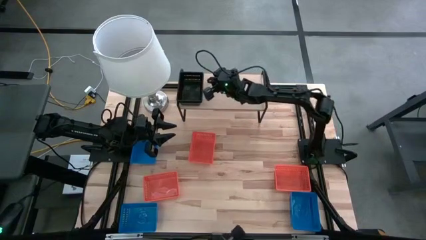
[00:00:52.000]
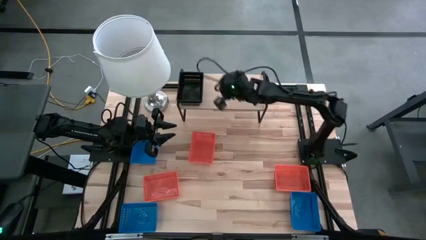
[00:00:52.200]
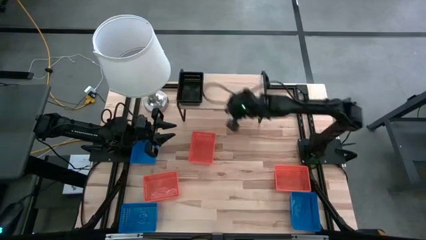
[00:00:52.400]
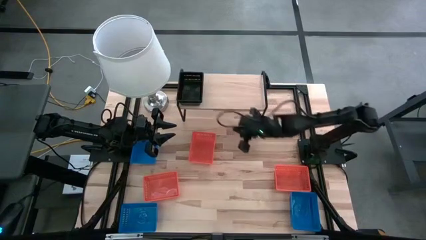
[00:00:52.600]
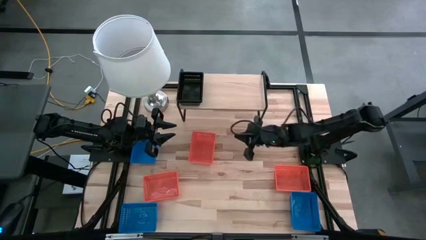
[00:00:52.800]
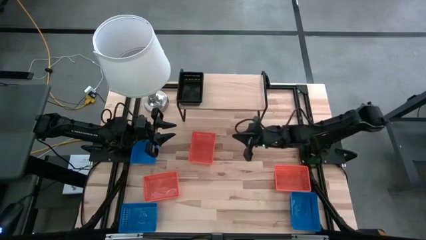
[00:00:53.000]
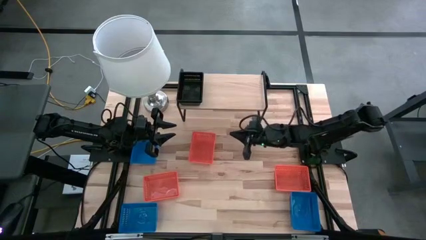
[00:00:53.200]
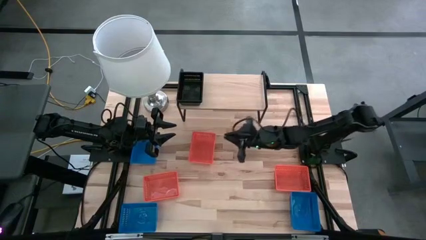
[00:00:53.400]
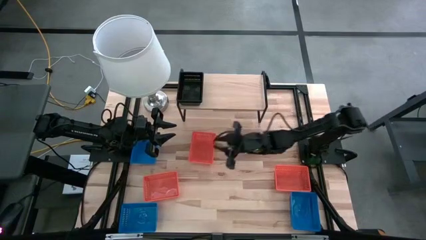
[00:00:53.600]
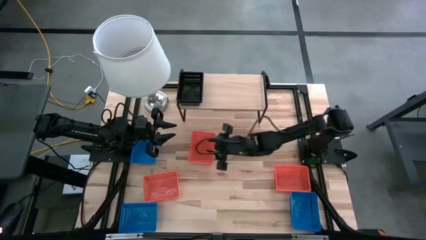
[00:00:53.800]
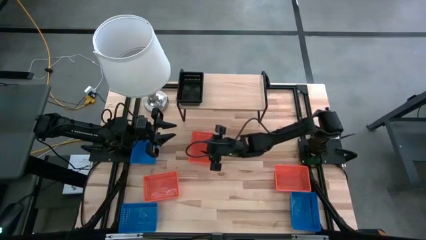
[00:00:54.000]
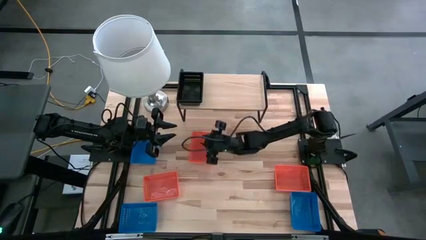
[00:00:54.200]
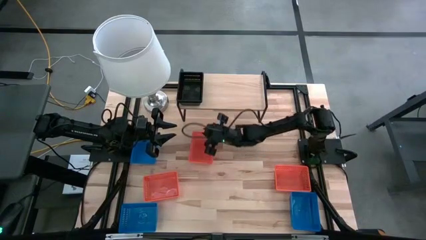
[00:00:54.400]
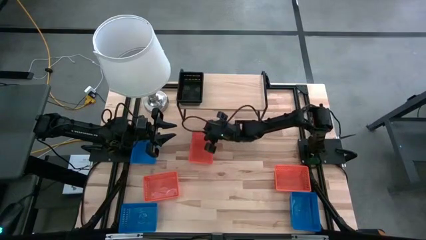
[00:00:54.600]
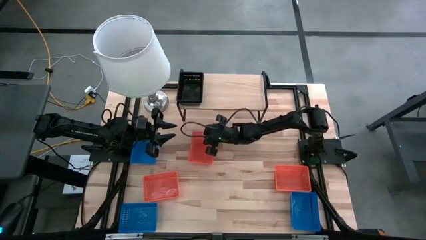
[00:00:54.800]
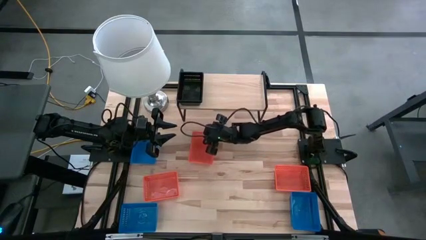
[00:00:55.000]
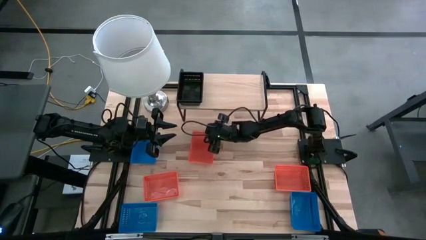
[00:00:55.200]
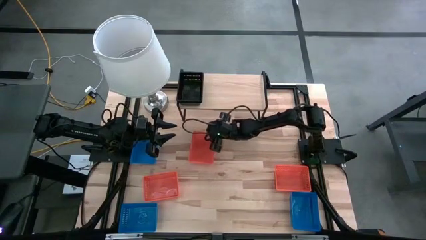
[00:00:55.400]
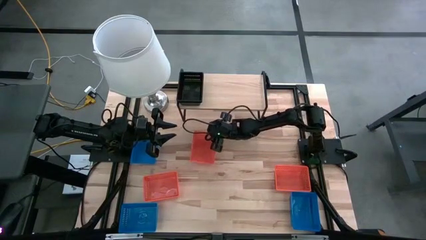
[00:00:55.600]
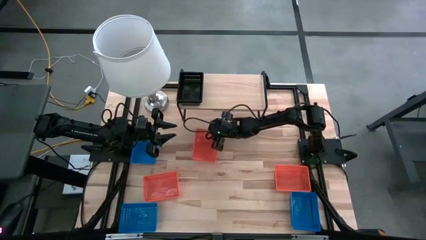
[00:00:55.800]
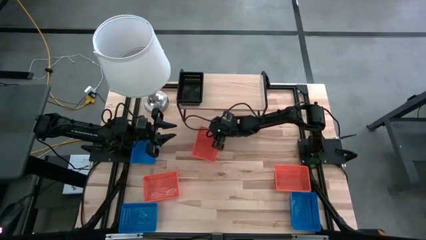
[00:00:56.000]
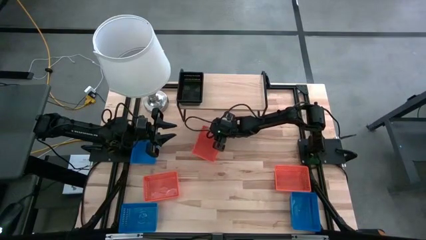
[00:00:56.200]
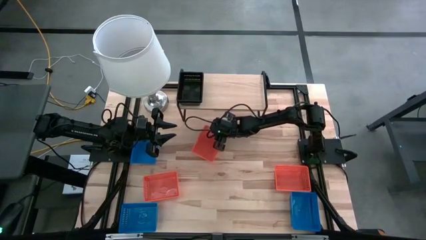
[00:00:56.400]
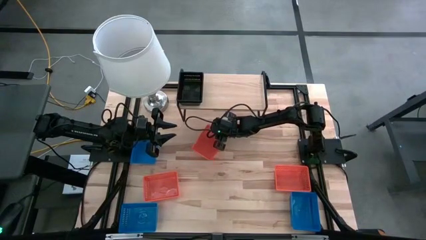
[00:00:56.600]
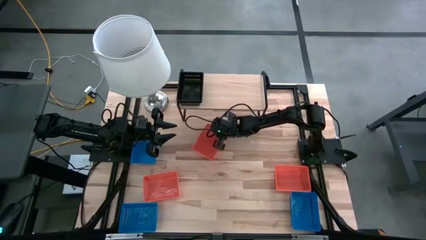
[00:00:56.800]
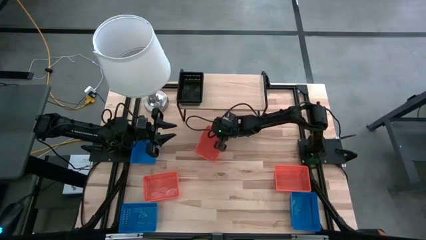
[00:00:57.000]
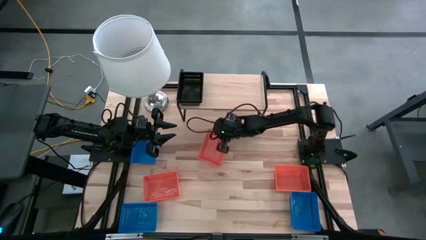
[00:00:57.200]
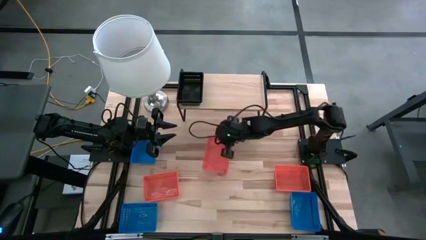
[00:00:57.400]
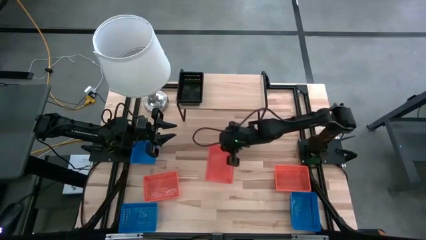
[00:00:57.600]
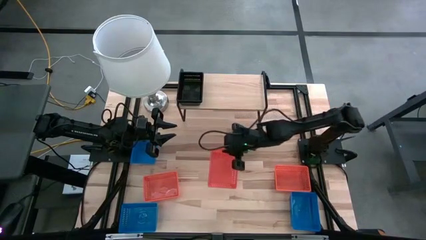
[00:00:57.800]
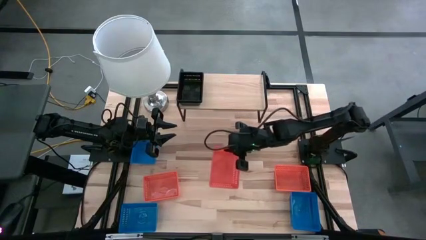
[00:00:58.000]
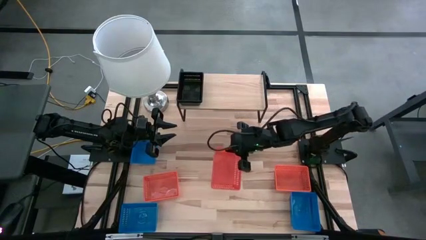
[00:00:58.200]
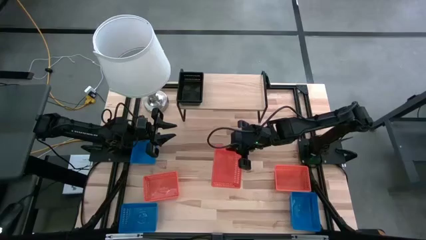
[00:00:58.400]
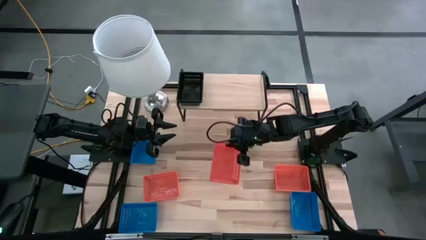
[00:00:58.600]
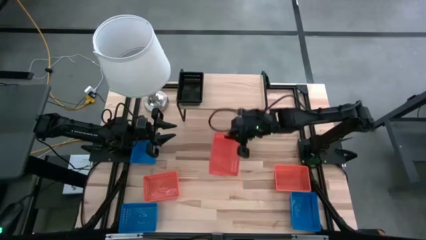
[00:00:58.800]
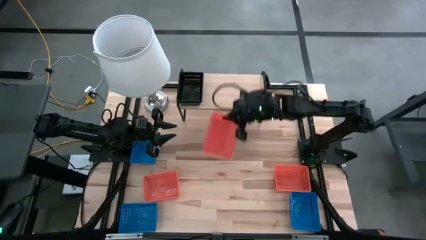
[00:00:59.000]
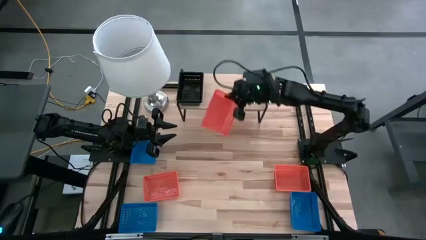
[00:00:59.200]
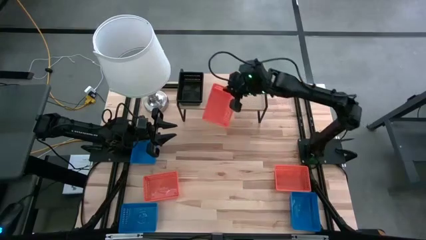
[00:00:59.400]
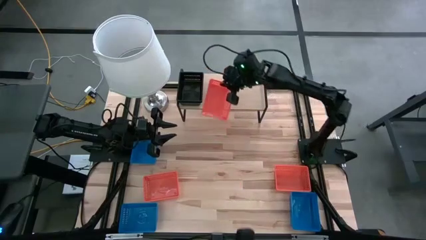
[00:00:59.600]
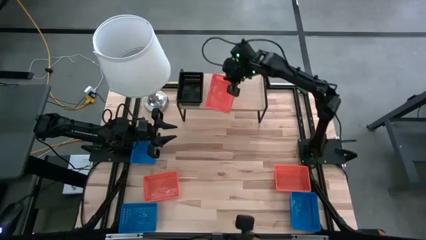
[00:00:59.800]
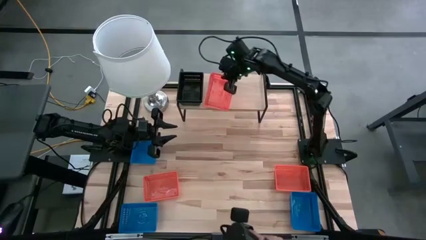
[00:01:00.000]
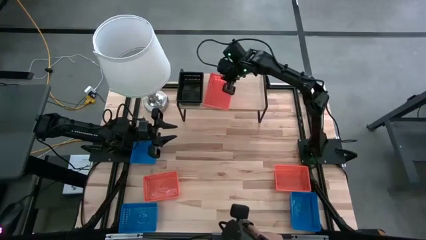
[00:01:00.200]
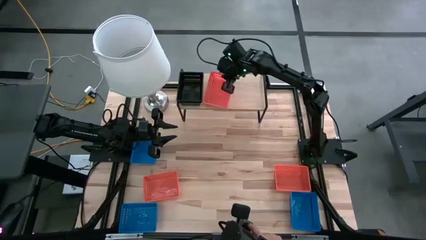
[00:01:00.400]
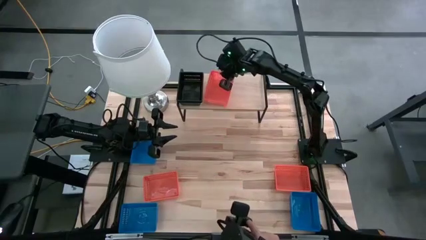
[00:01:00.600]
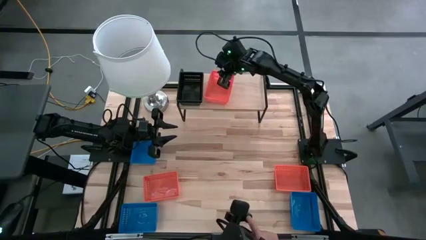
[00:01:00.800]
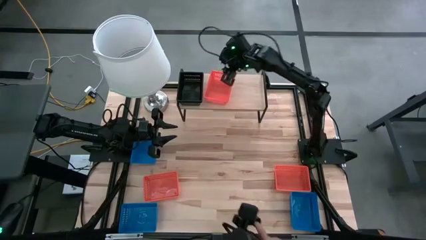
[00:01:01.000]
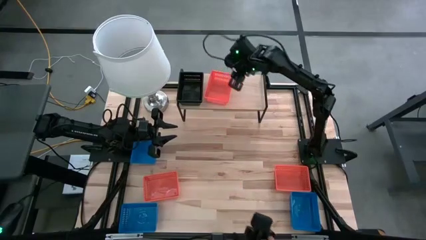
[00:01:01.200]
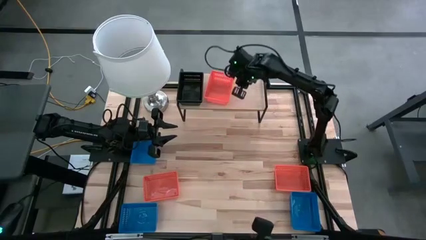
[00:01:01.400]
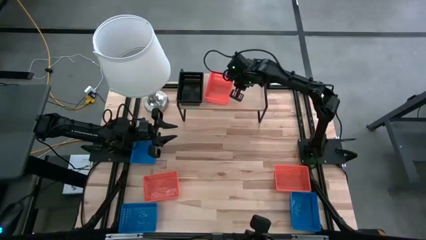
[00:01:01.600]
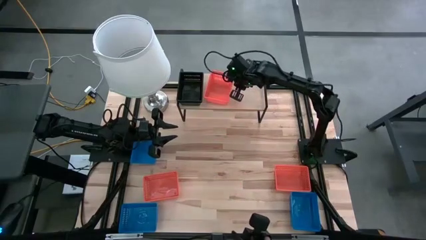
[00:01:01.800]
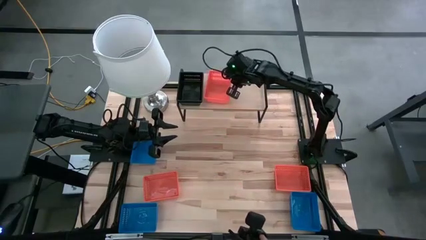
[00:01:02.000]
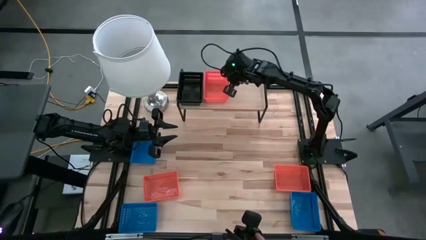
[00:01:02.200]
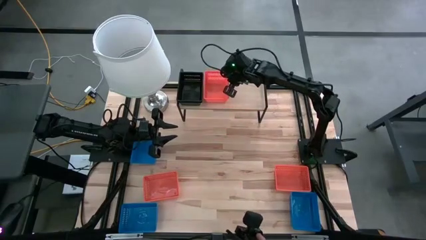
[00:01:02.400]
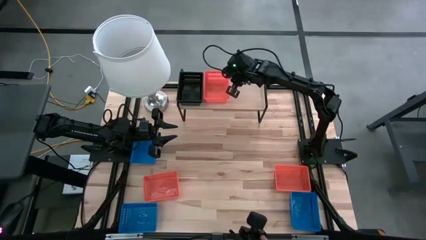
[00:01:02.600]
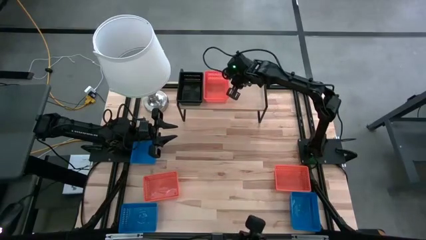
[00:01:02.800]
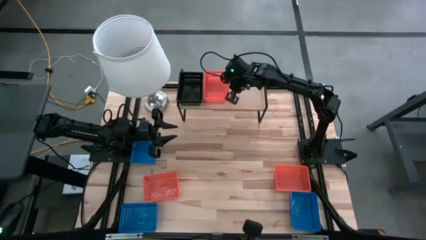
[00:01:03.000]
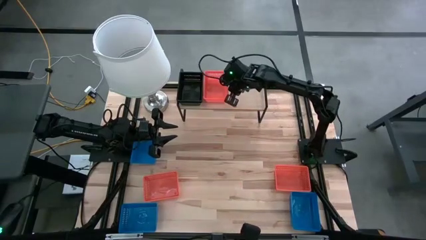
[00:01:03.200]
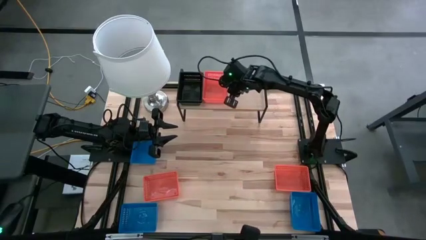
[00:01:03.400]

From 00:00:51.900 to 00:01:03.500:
Task: Stack baskets on shelf by color
Put the top orange bin on the shelf

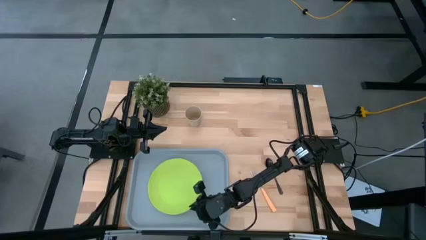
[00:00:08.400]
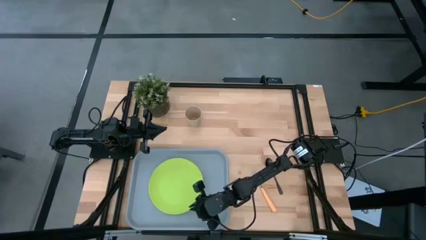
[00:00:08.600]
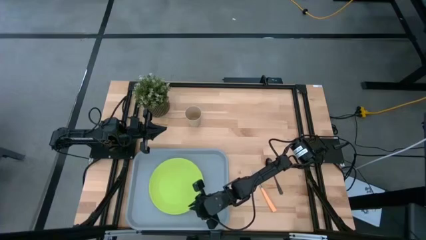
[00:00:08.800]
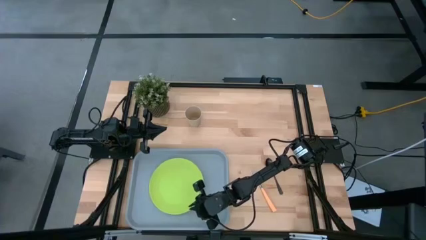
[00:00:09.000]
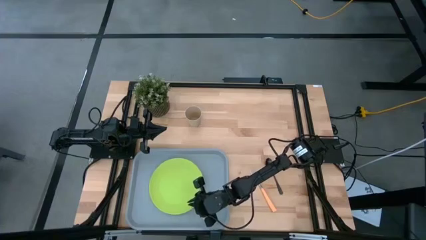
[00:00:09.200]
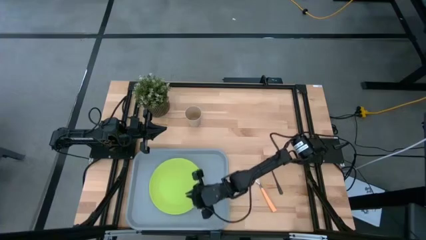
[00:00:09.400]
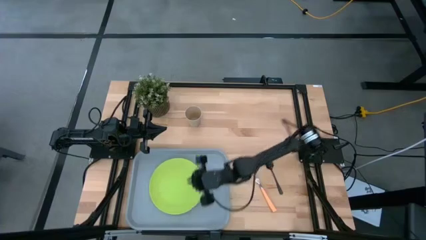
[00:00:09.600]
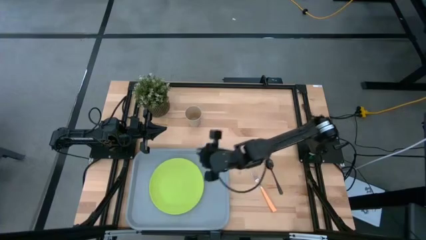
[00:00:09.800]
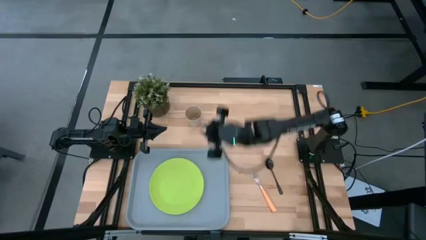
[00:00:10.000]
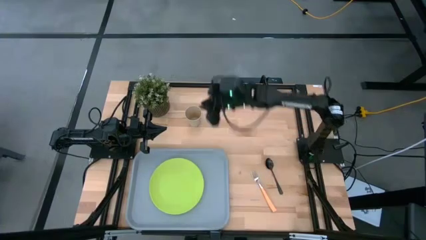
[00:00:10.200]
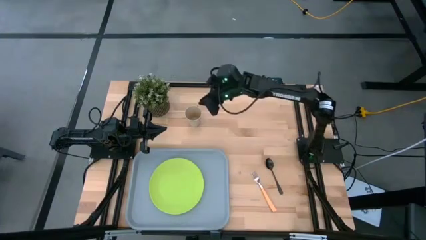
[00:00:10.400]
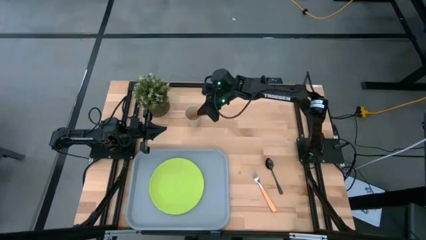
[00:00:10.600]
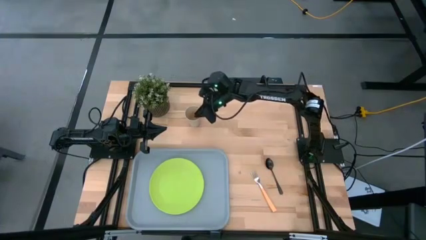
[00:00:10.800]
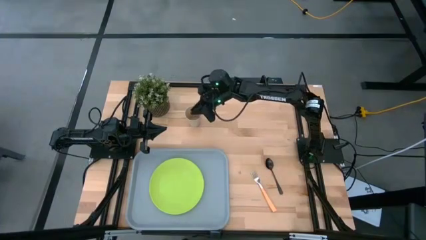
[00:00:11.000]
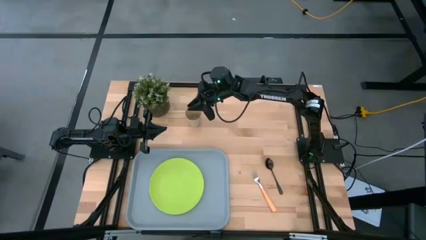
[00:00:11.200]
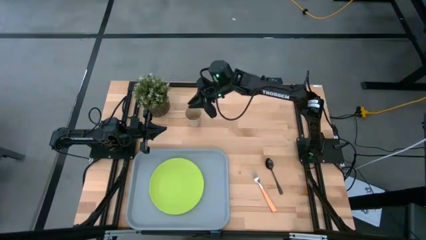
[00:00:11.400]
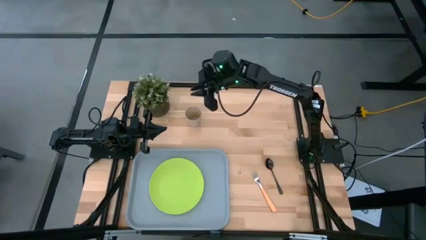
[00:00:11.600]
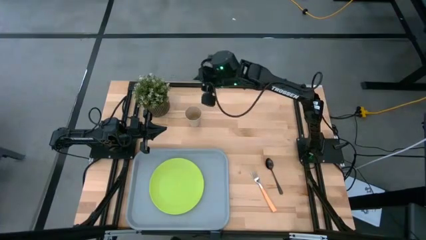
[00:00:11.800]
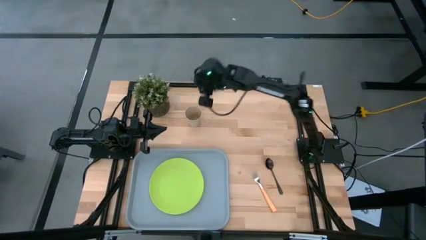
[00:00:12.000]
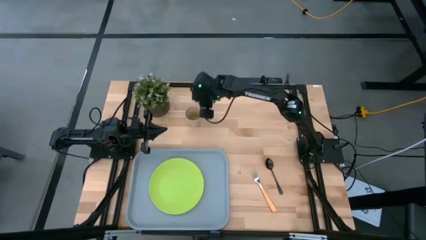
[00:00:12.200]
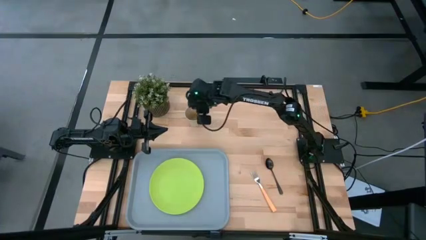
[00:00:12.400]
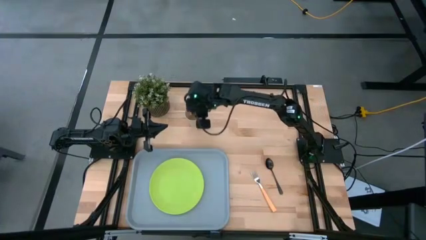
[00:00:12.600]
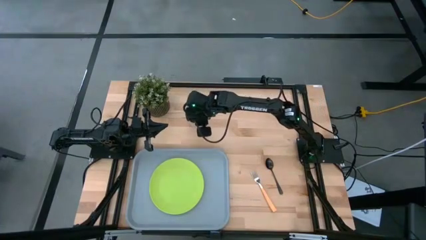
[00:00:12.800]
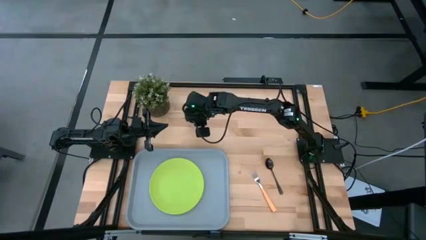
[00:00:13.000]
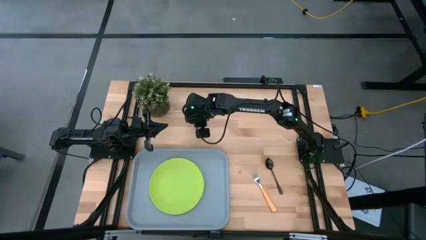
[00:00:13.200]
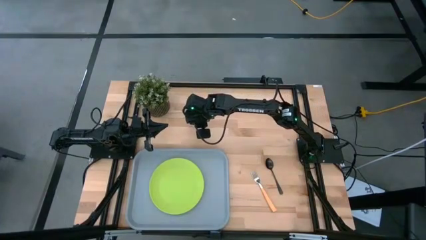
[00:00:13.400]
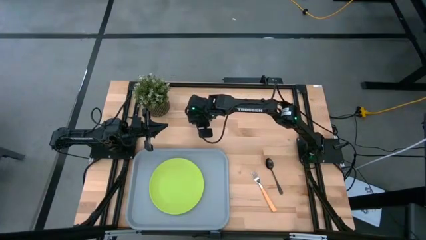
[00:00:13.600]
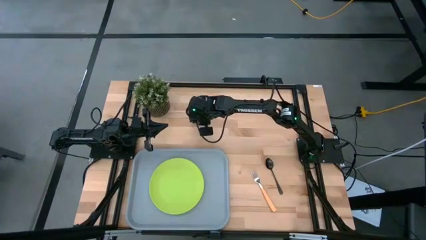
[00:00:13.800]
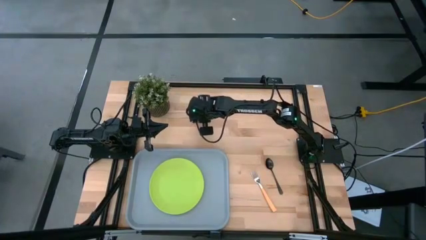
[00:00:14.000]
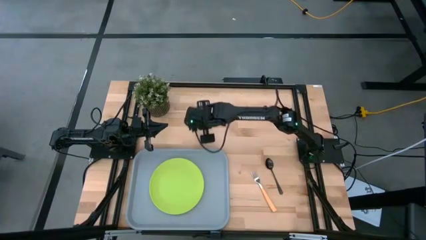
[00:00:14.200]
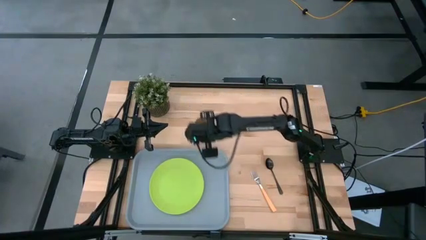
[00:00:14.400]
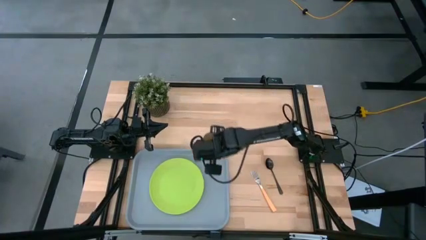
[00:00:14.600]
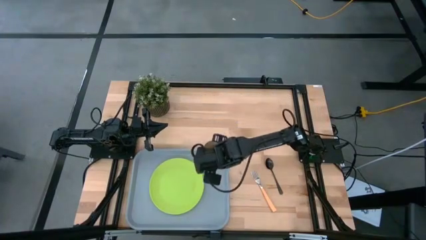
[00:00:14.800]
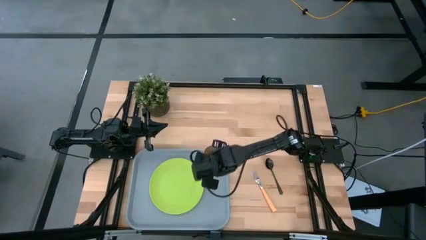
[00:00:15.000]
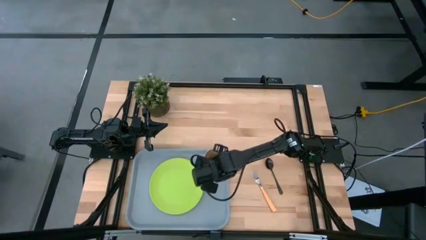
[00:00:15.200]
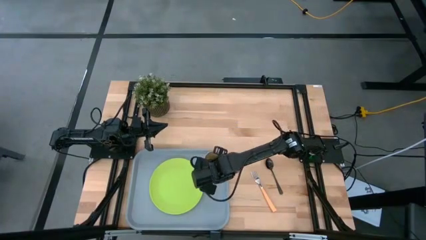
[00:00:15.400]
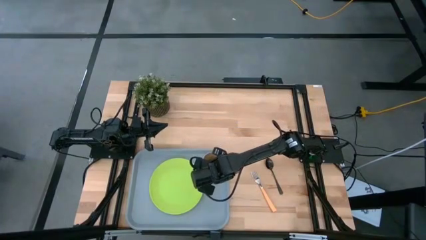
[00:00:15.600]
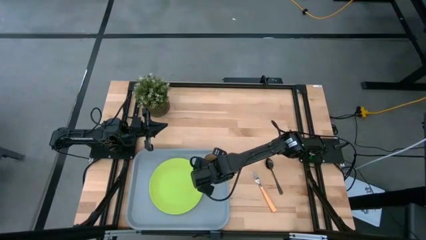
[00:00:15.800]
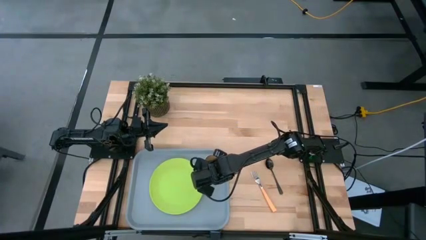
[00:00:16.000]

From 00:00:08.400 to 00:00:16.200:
Task: Pick and place plate/cup/fork/spoon on tray
Put the light brown cup on the serving tray
